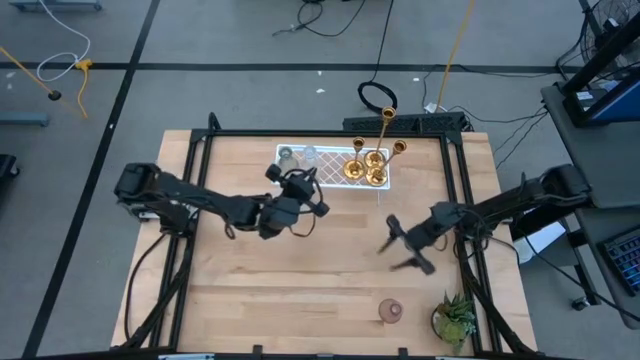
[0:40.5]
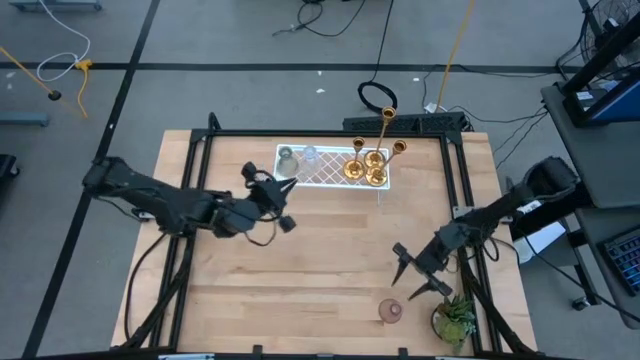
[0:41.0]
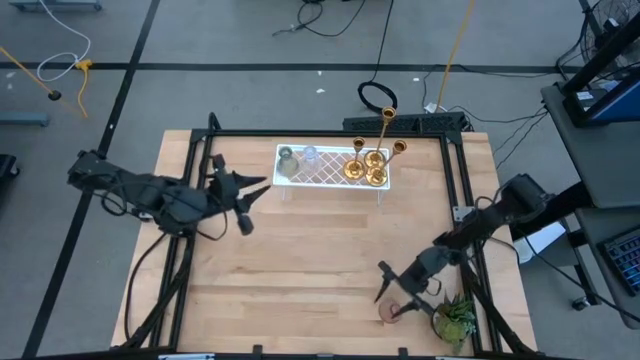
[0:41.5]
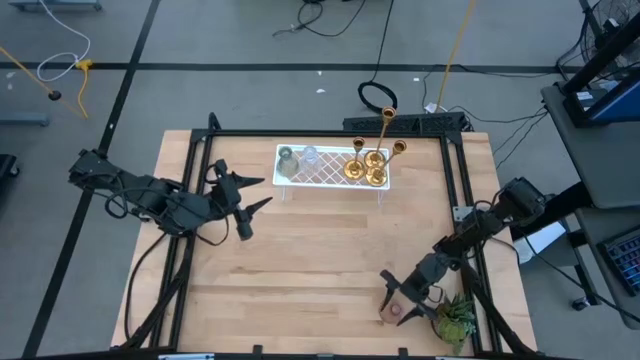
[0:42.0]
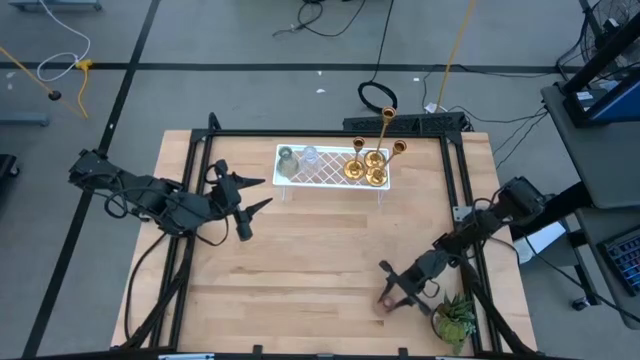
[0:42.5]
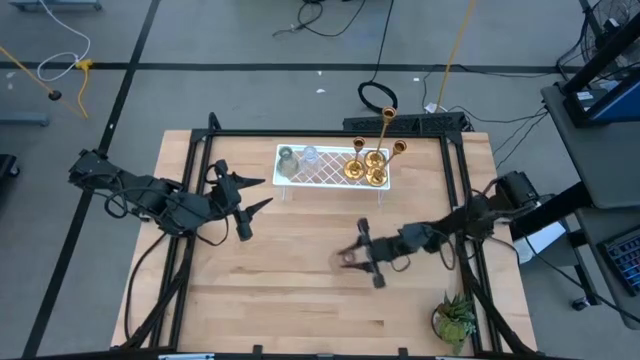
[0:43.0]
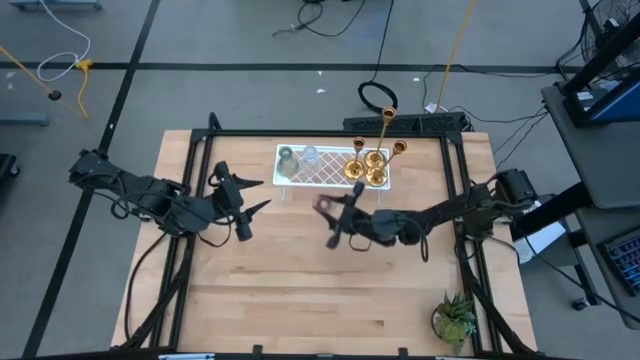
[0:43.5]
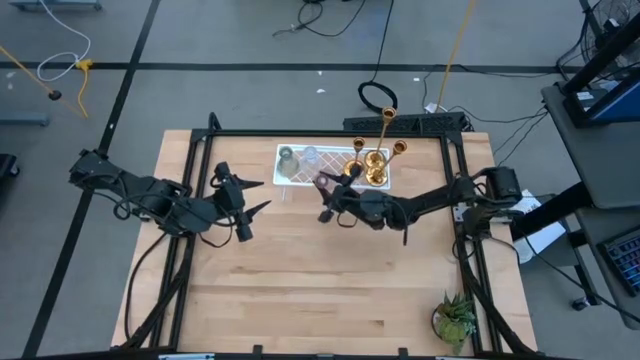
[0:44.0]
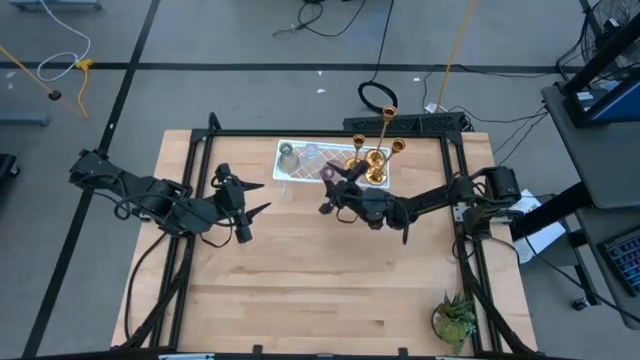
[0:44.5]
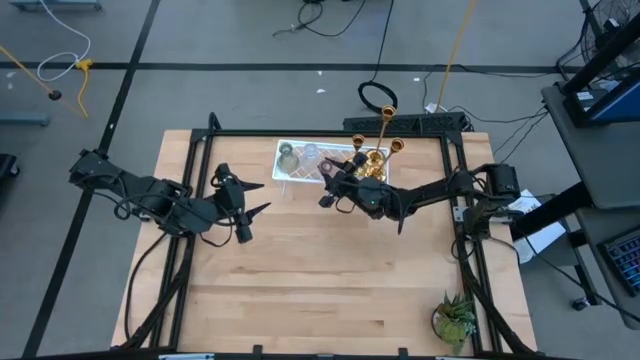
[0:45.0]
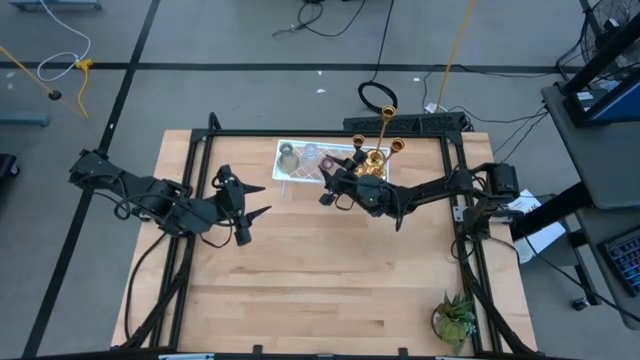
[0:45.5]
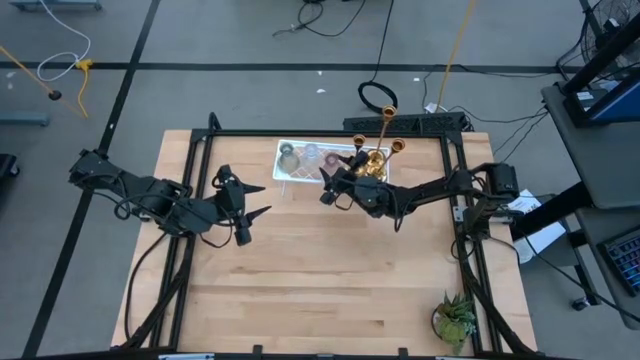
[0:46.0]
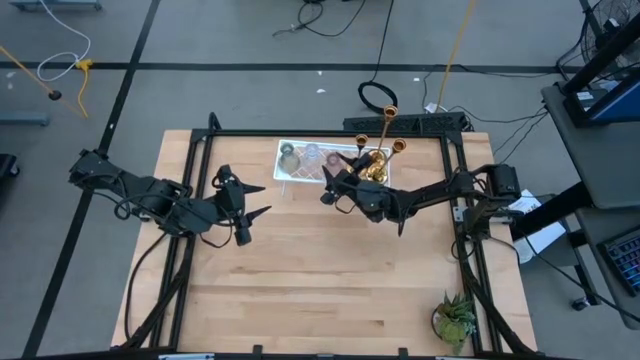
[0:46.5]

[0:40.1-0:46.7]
Task: Pick & Place candle stick holders
Put the violet candle holder on the shelf

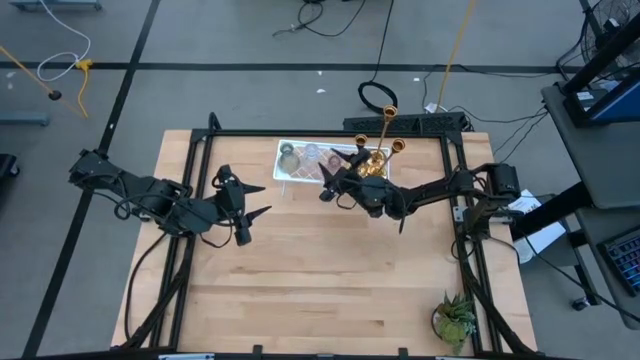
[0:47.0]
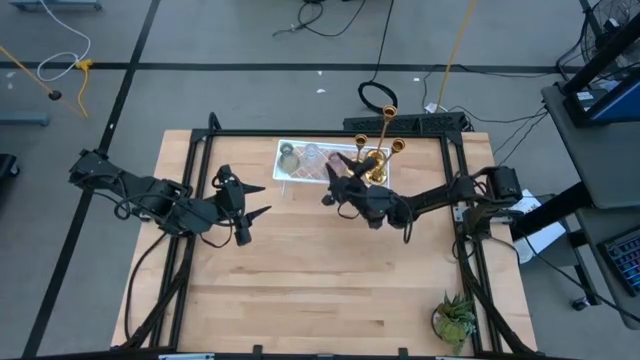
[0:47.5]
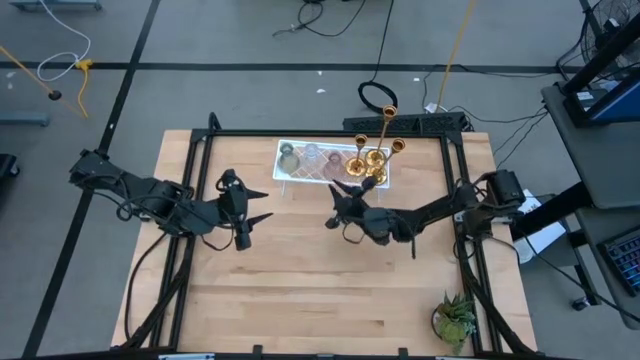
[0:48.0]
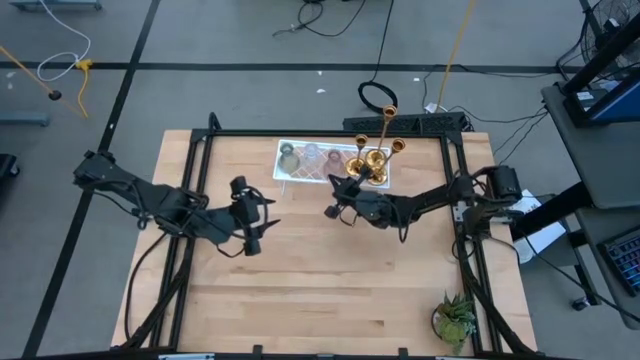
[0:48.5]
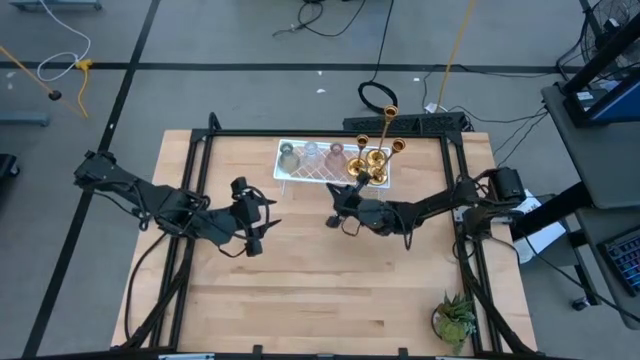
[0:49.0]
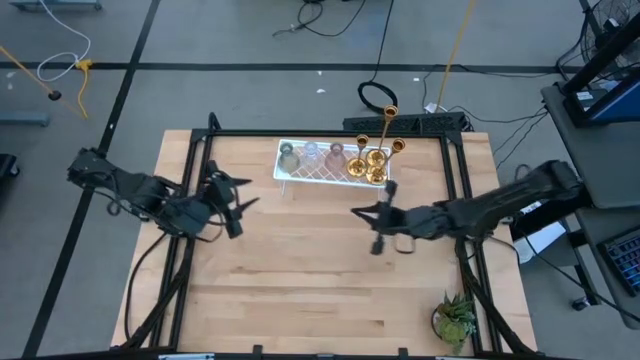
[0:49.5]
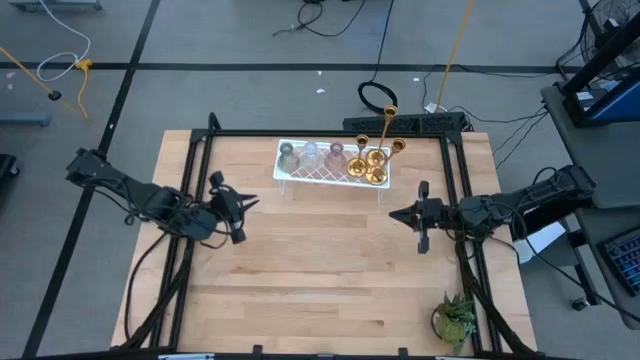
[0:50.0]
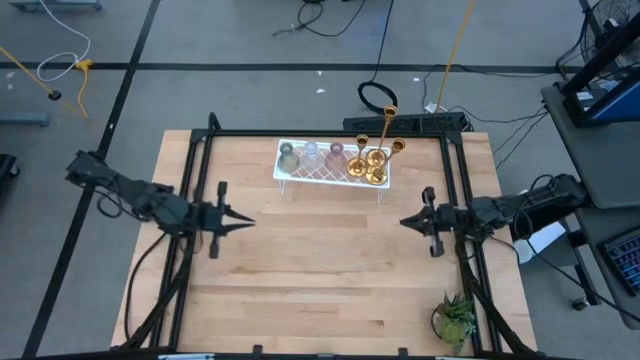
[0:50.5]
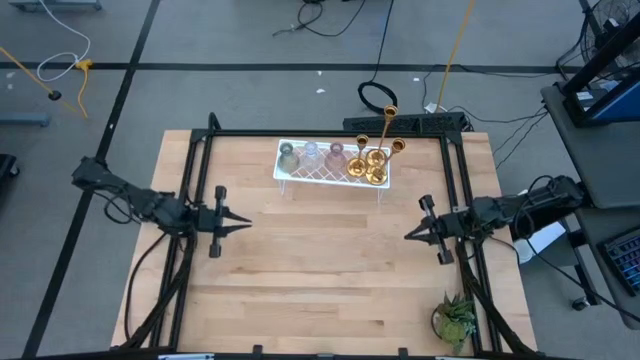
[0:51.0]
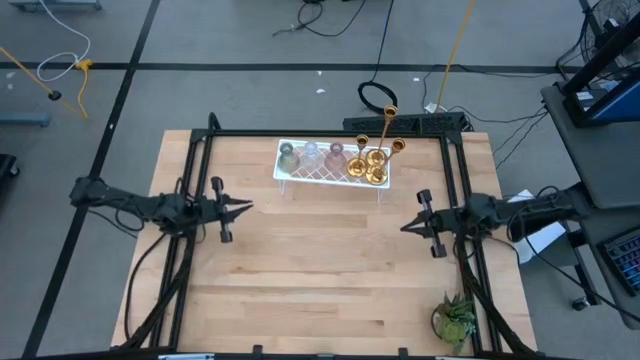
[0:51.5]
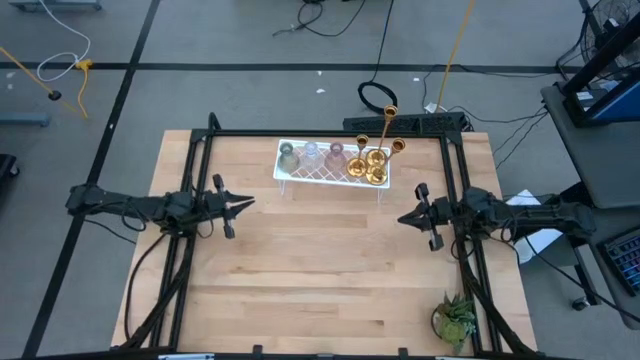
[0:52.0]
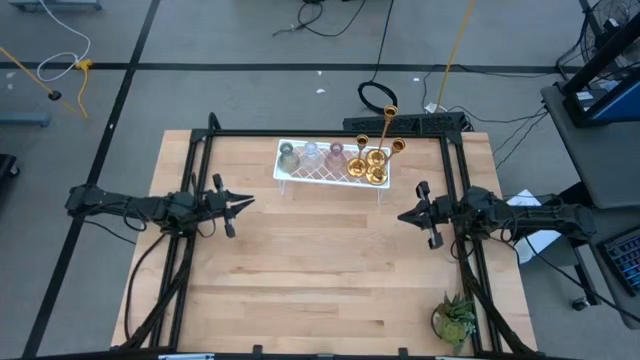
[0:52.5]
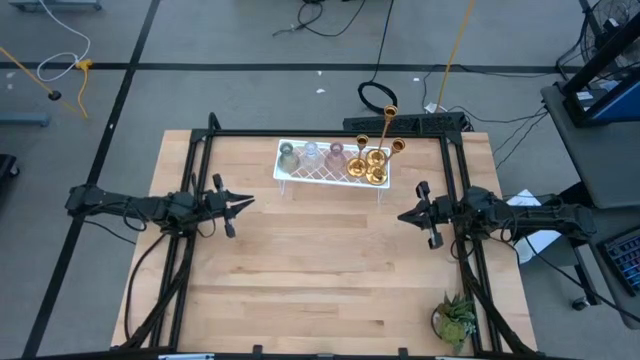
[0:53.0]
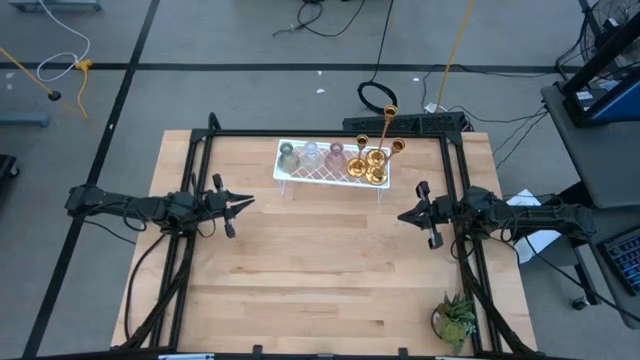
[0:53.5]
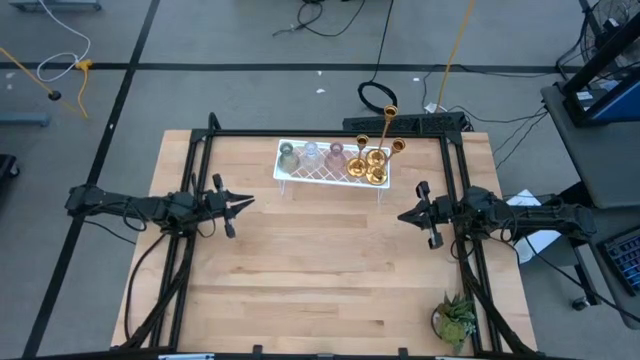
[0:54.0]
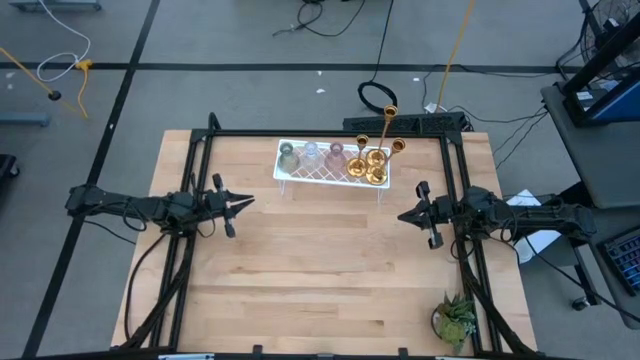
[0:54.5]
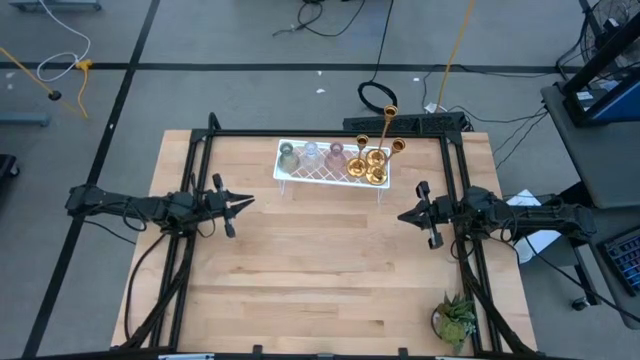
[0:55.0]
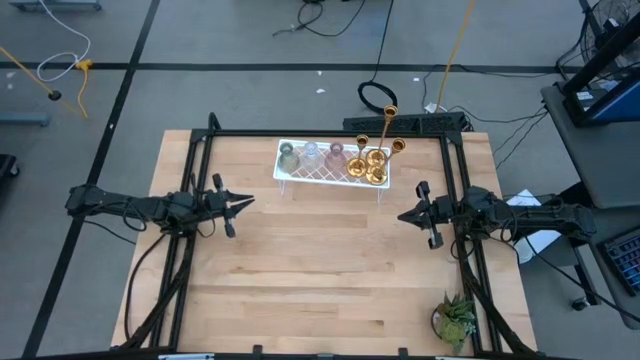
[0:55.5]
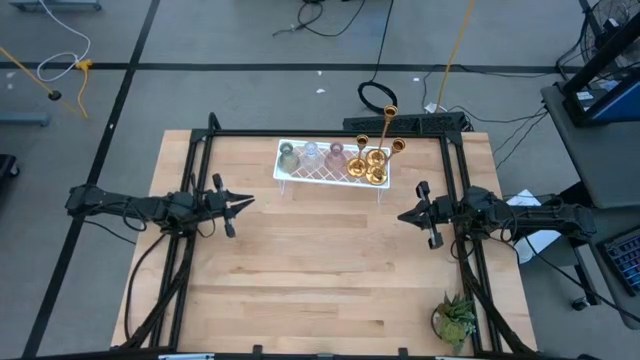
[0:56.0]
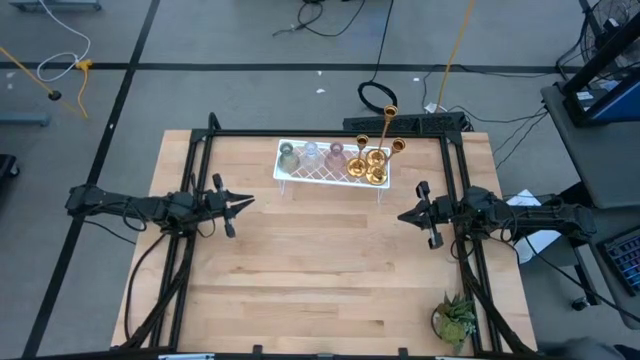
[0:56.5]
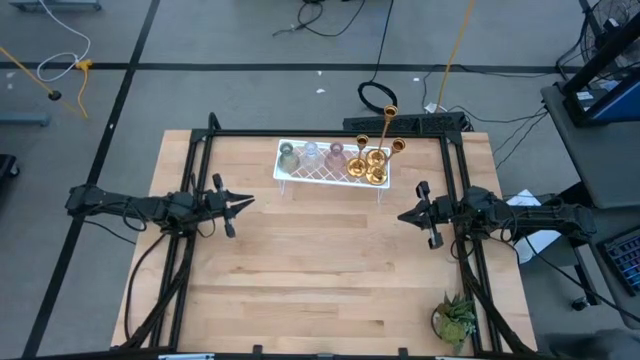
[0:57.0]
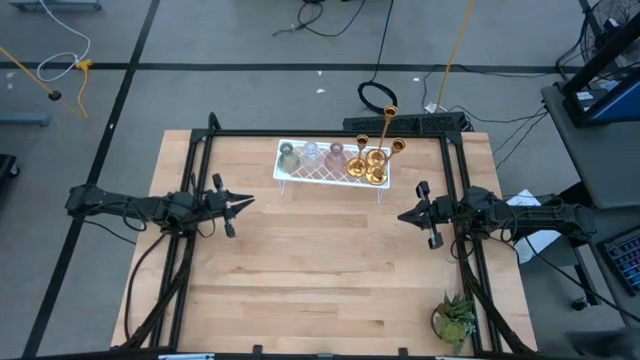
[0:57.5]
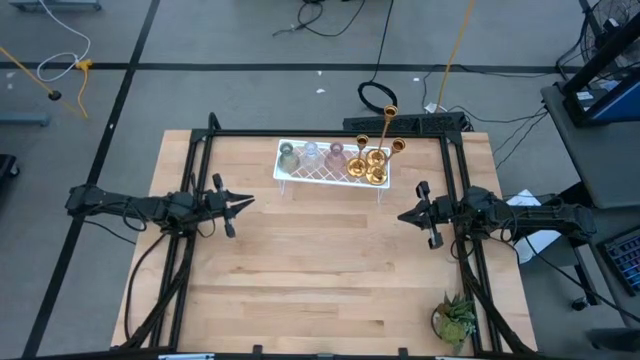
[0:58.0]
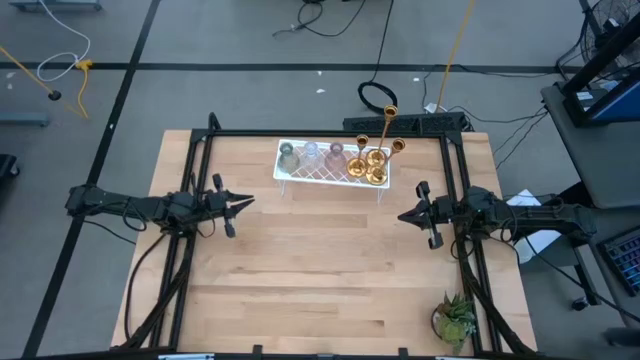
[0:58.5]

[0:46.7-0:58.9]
Return to Home Position
